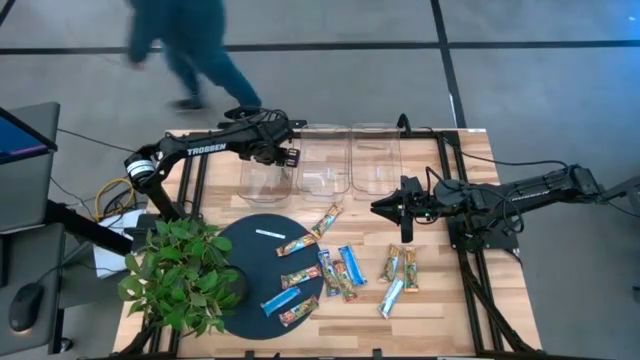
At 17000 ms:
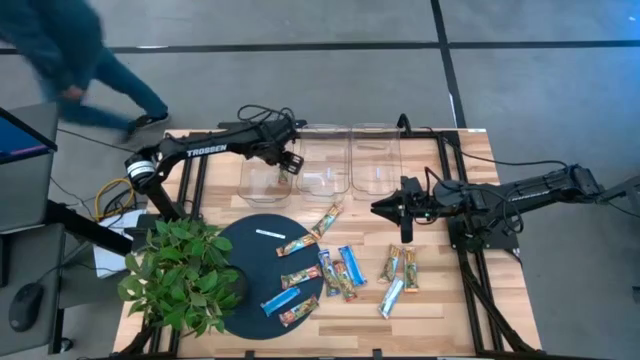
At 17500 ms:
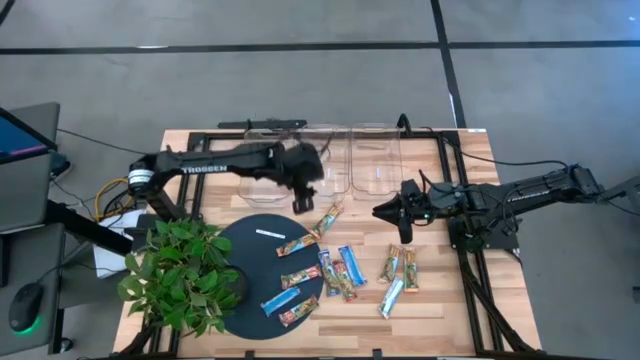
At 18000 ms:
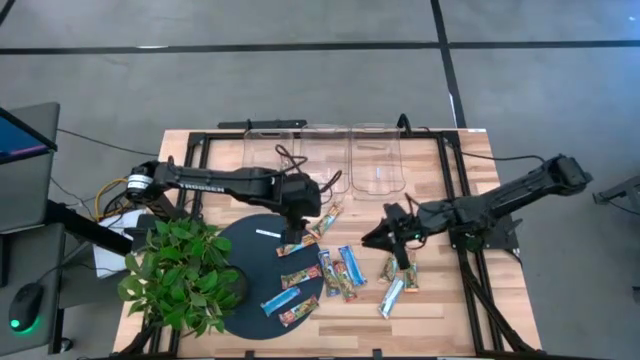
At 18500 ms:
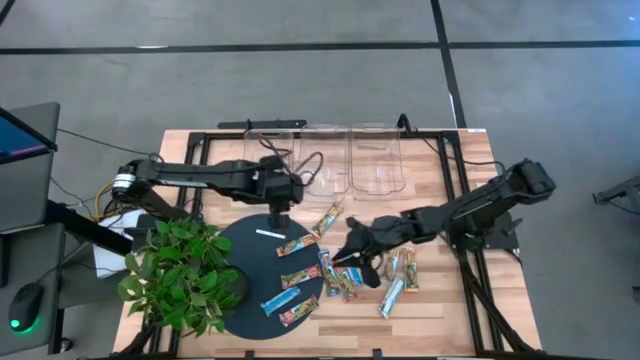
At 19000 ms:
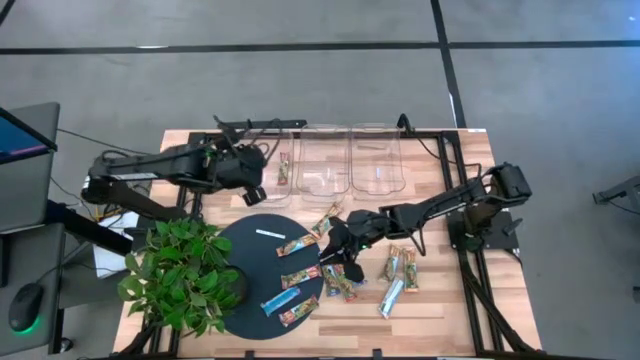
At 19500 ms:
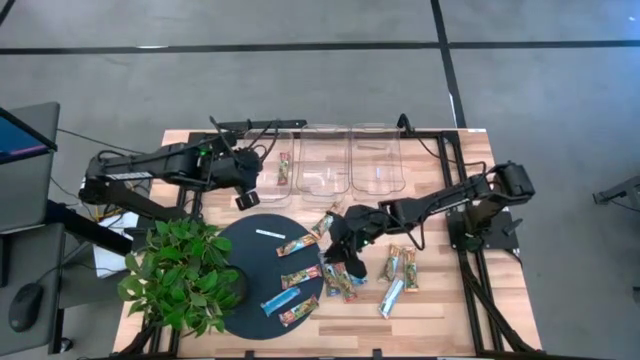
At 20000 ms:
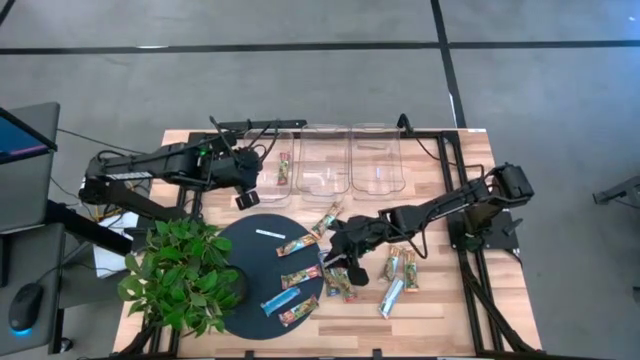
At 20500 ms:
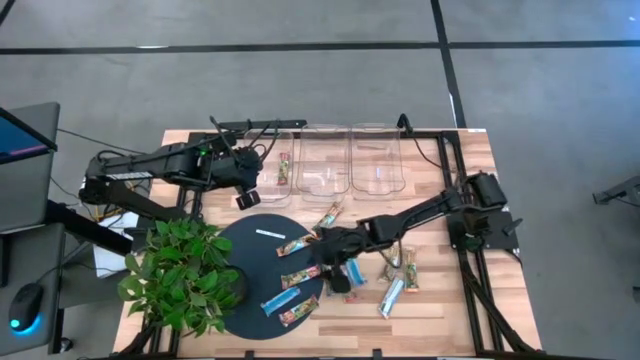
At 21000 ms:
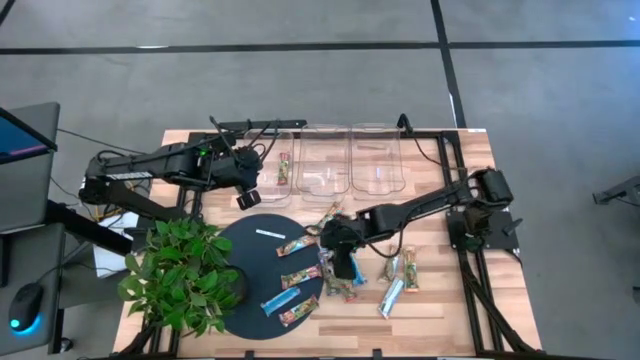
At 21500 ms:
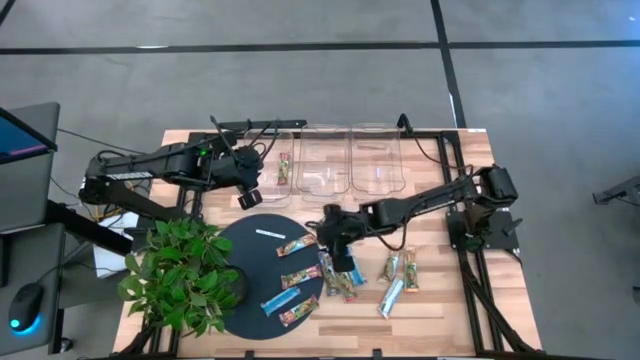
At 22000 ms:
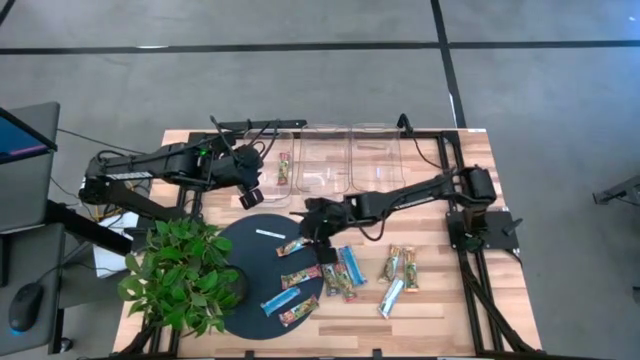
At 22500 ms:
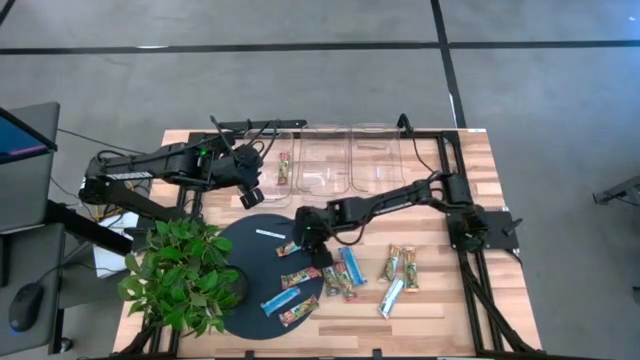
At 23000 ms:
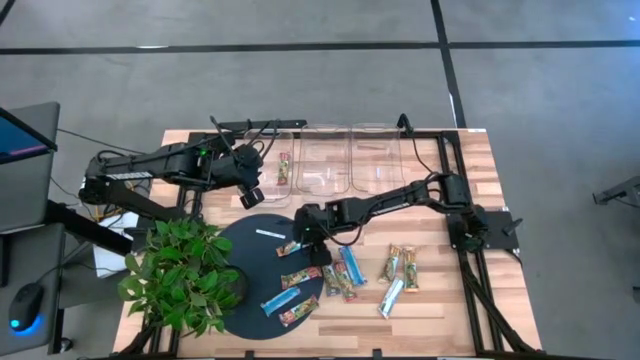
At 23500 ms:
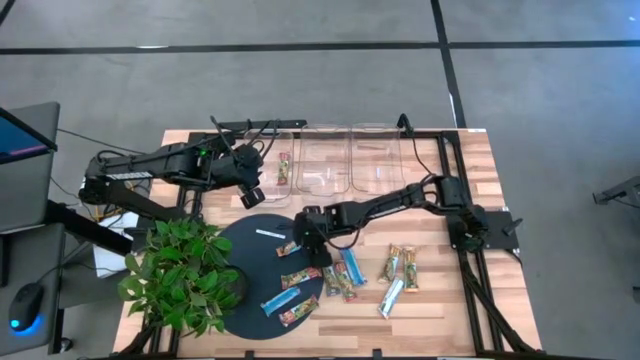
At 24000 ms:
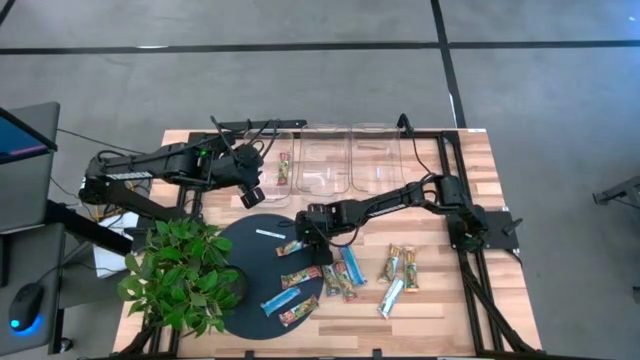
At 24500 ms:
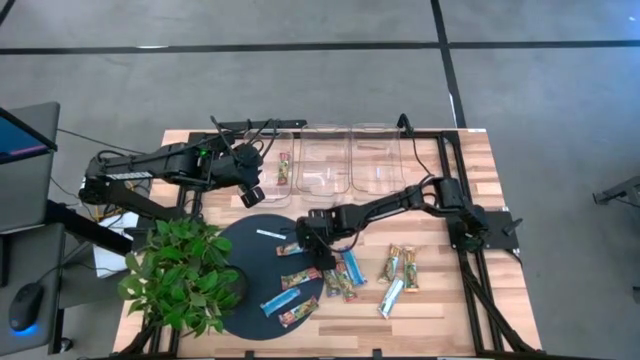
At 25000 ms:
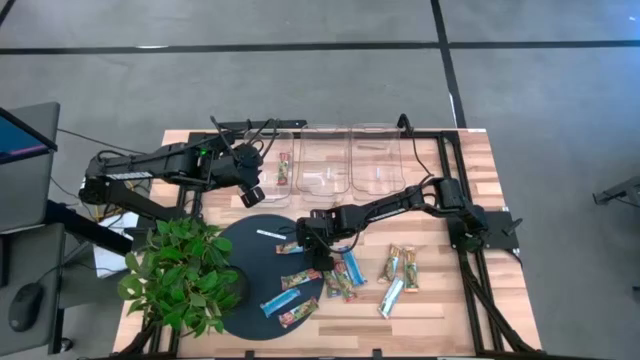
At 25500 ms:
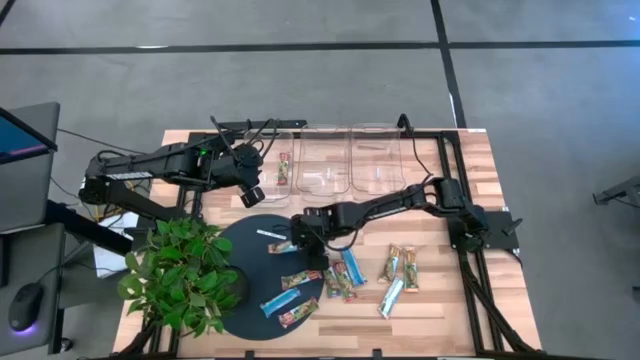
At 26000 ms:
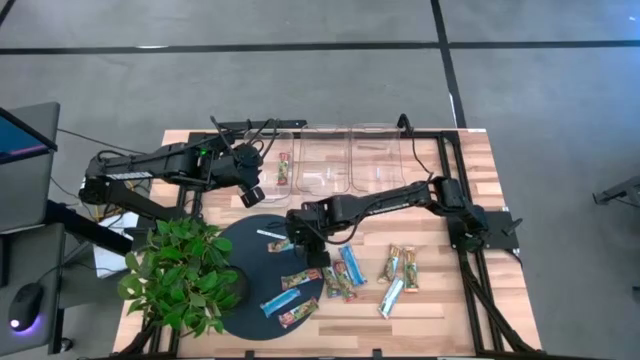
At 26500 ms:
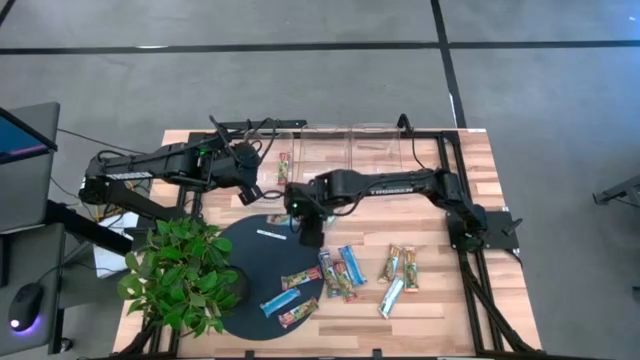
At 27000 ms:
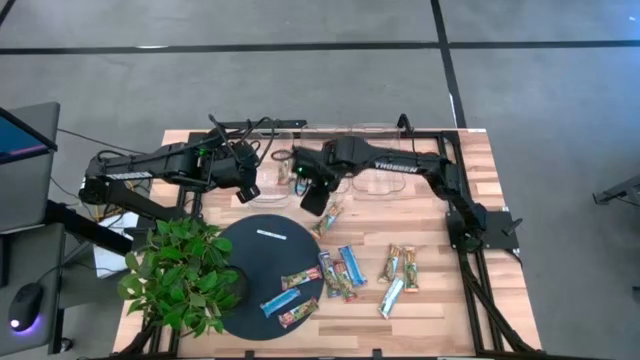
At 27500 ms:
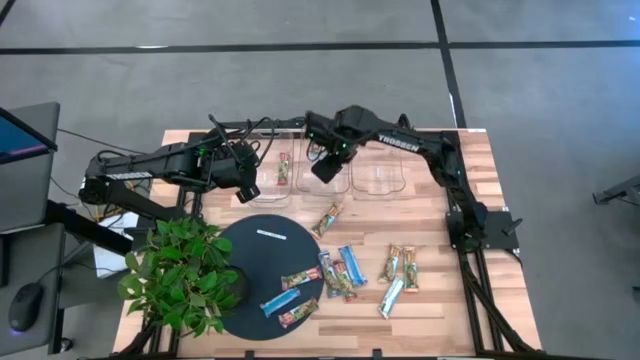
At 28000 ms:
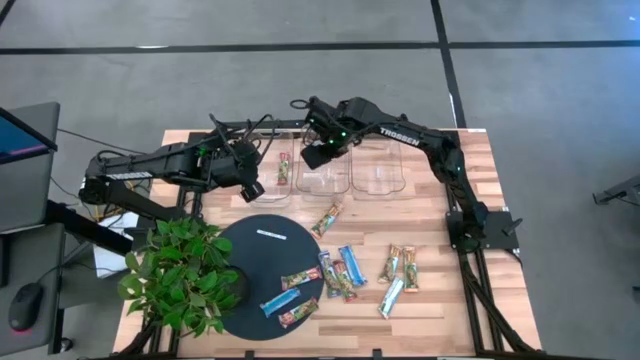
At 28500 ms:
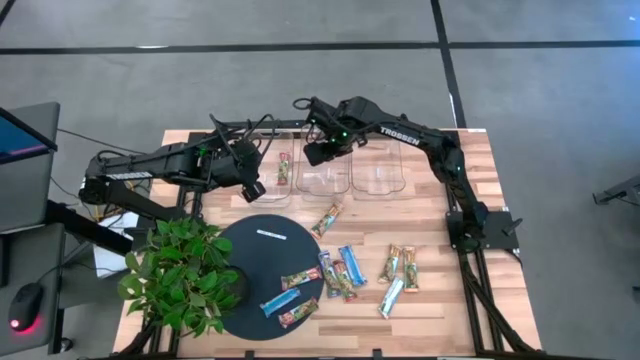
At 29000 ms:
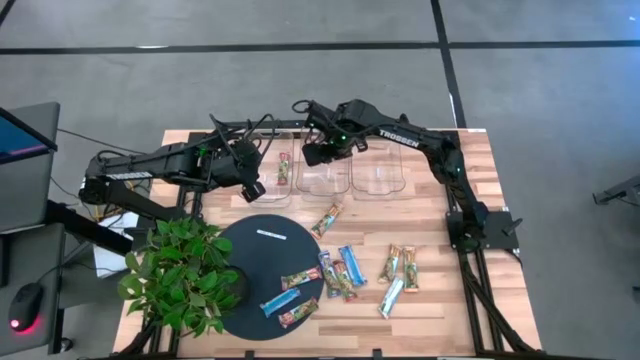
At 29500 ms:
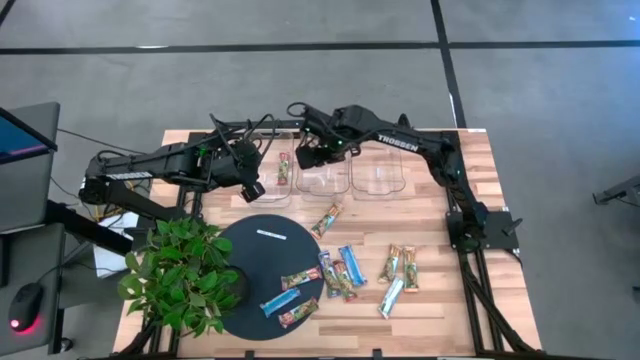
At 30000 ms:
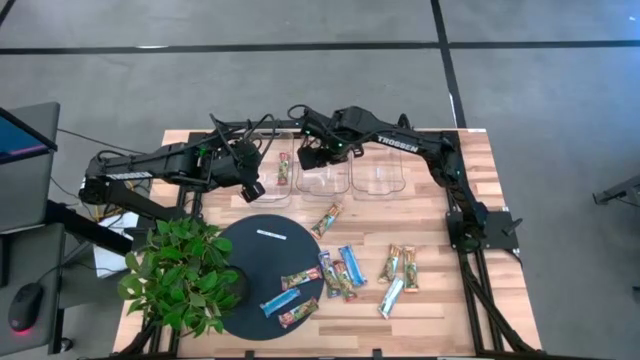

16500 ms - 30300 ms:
Task: Pick and place Granola Bars by type
Put the yellow granola bar into the middle transparent bin
